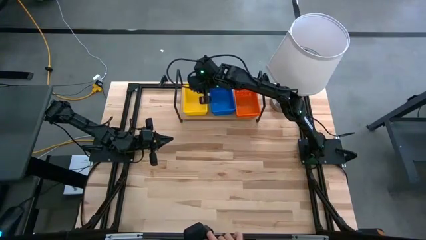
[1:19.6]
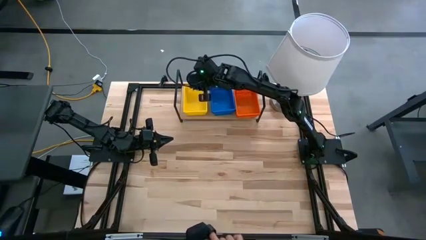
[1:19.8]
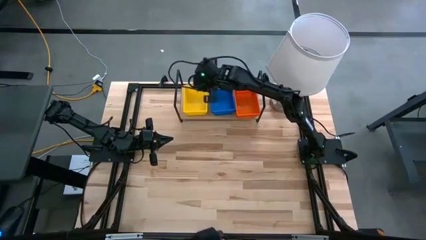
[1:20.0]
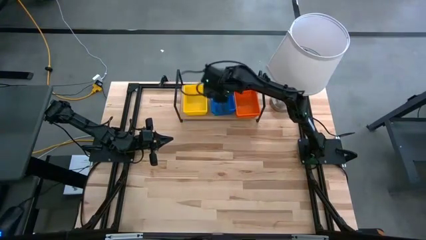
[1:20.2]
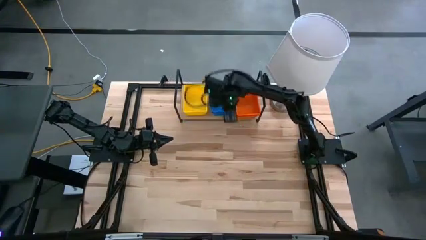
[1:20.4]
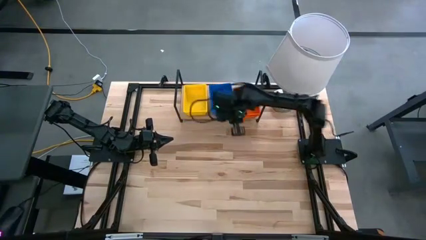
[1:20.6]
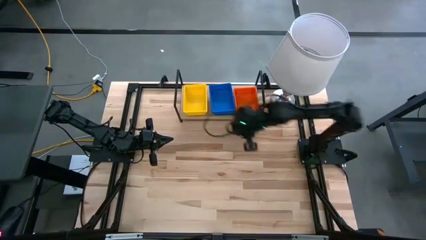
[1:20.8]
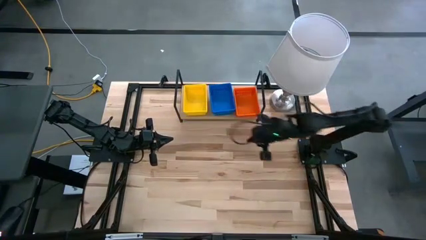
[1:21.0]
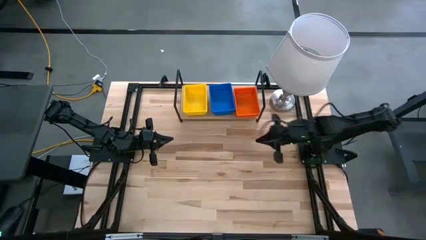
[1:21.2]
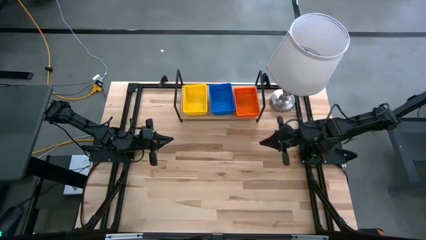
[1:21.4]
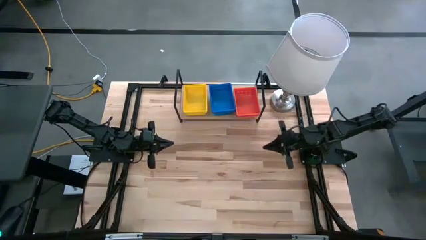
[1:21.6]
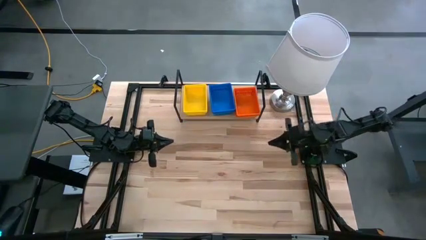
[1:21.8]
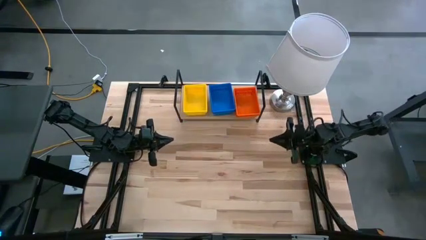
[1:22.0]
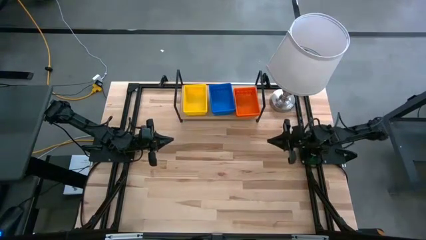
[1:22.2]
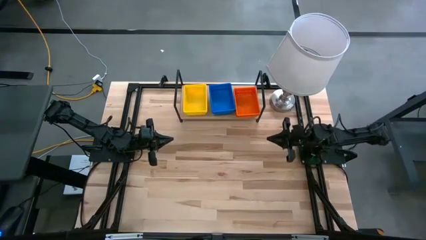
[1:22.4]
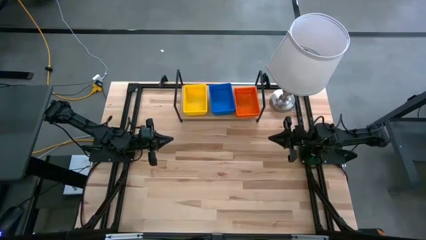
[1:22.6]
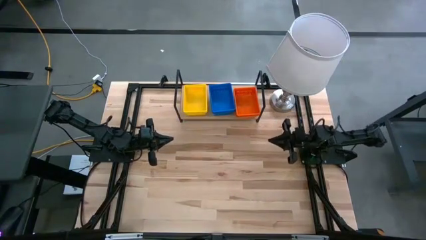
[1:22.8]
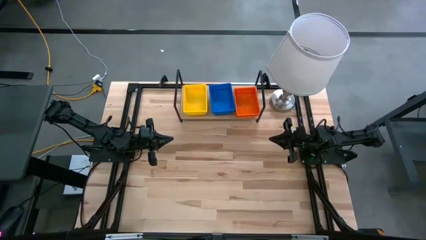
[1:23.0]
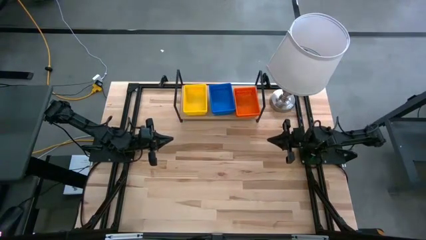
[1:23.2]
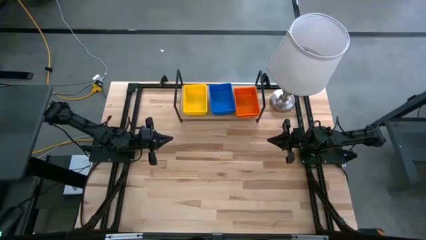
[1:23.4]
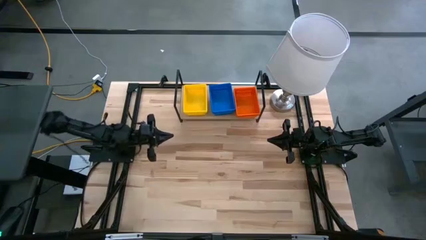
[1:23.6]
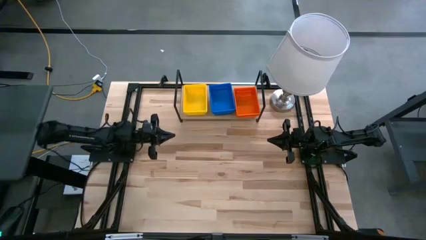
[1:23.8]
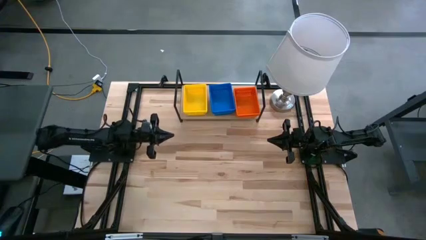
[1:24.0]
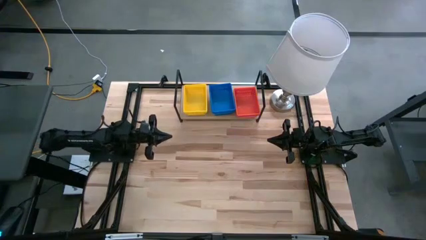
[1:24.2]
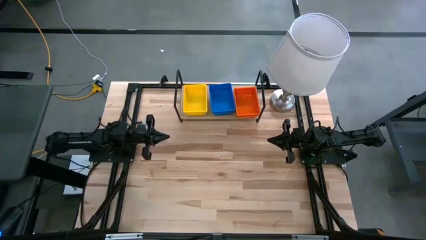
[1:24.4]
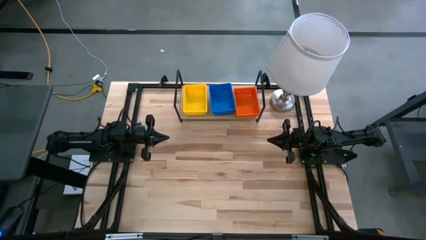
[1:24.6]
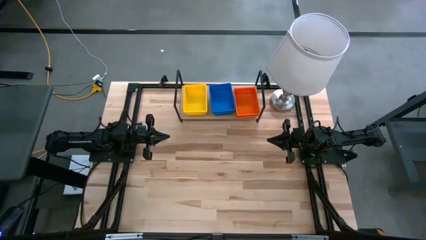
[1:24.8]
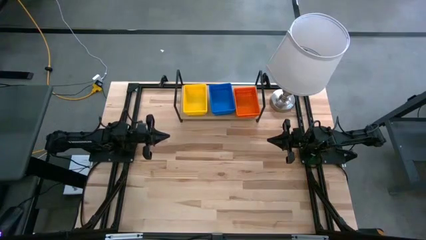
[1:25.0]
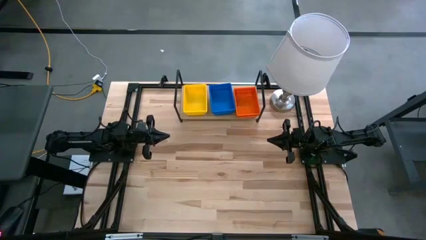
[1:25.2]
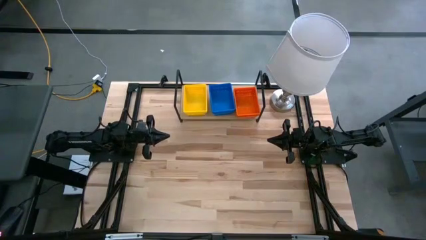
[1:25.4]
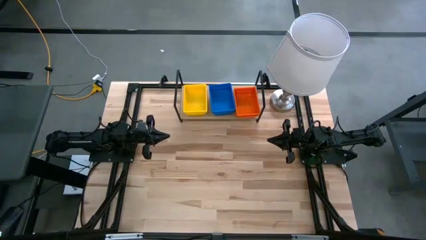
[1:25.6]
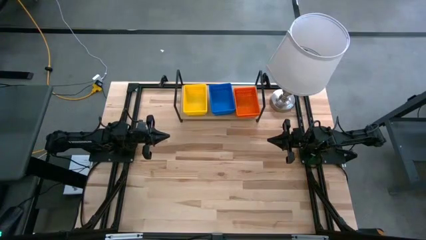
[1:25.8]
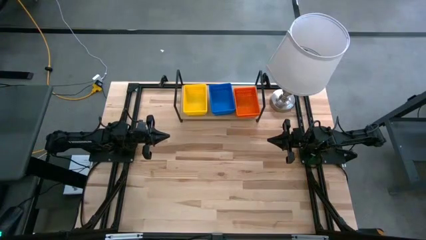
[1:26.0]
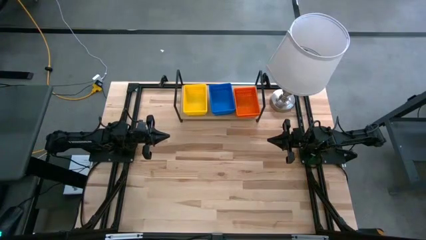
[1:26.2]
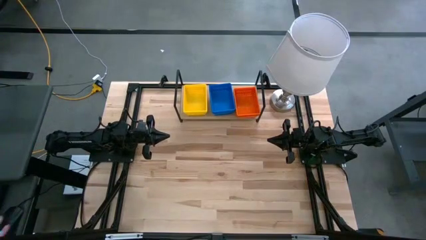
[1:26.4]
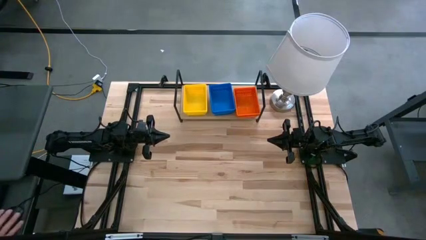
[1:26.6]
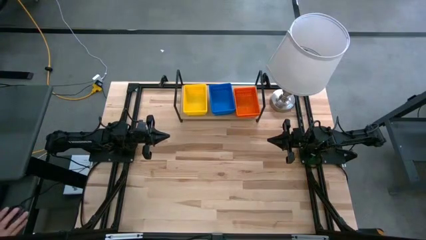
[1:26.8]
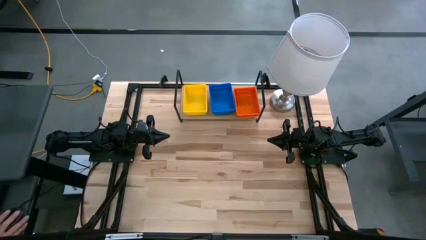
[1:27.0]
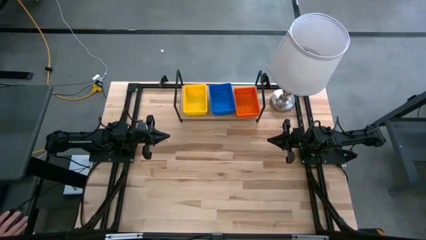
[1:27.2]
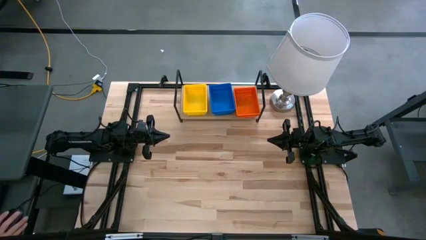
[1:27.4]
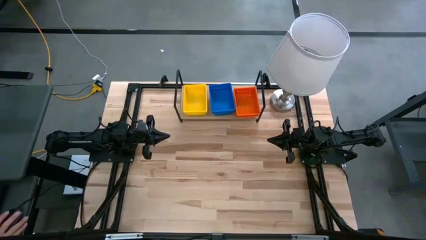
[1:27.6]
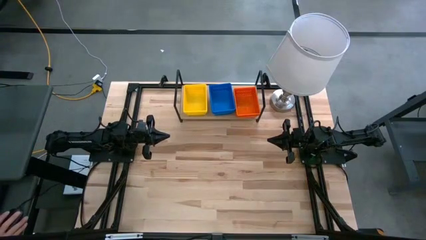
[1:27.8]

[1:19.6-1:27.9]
Task: Stack baskets on shelf by color
Return to Home Position

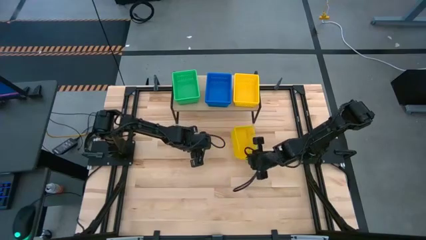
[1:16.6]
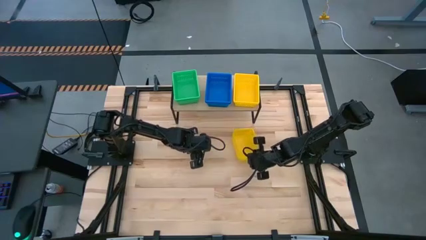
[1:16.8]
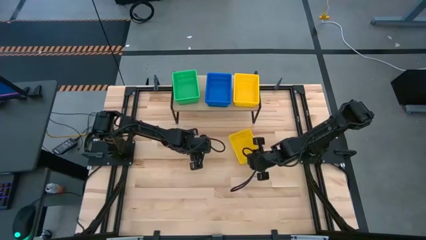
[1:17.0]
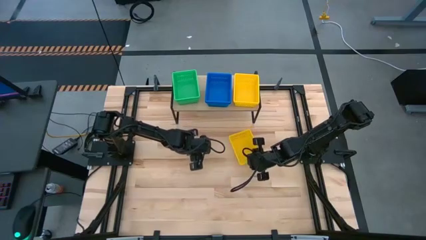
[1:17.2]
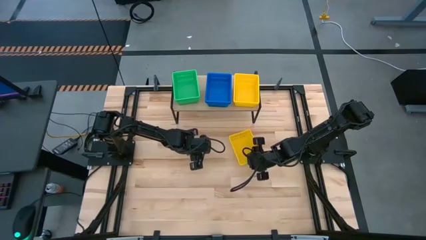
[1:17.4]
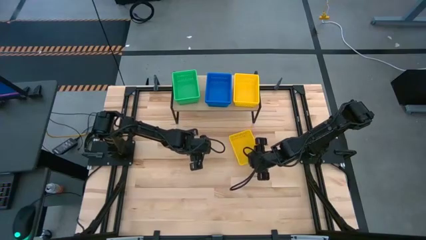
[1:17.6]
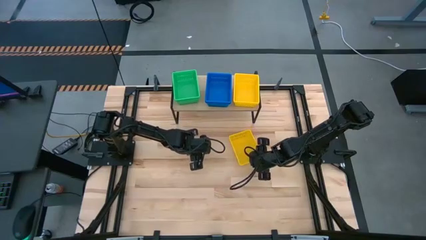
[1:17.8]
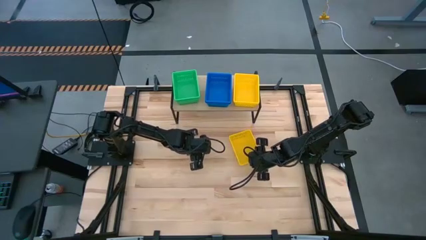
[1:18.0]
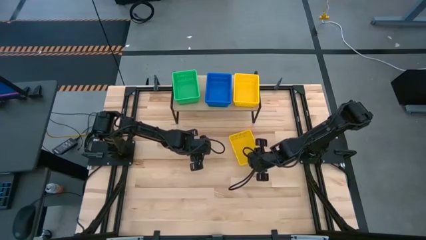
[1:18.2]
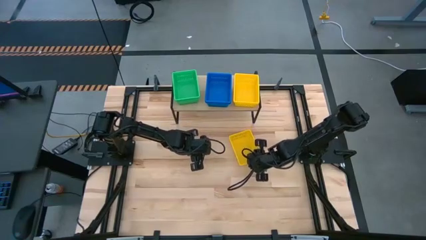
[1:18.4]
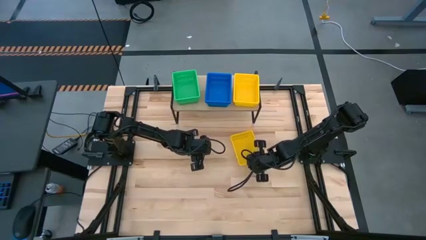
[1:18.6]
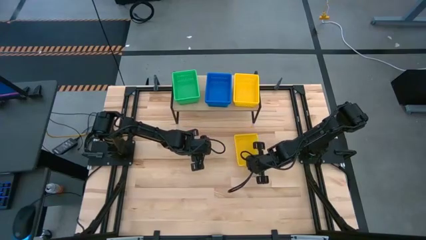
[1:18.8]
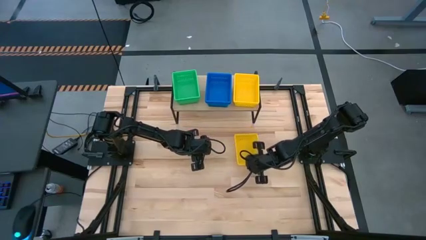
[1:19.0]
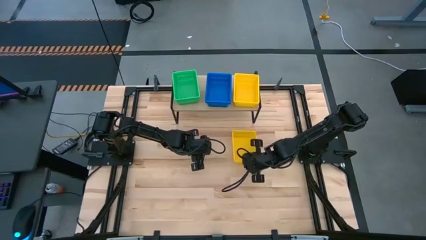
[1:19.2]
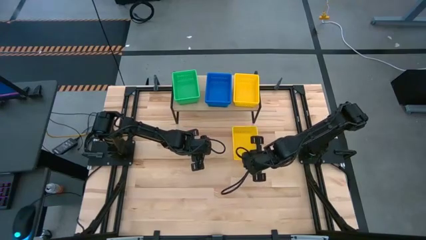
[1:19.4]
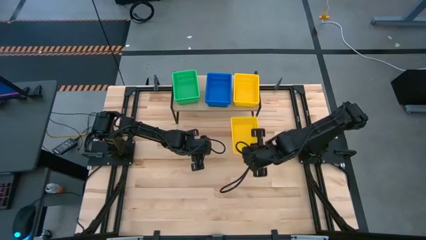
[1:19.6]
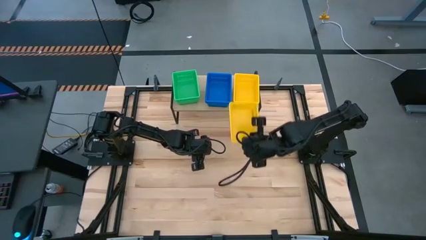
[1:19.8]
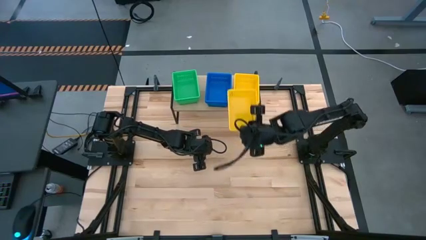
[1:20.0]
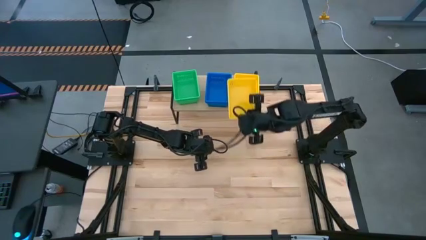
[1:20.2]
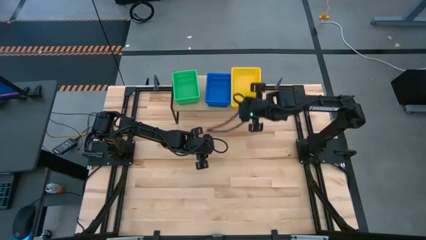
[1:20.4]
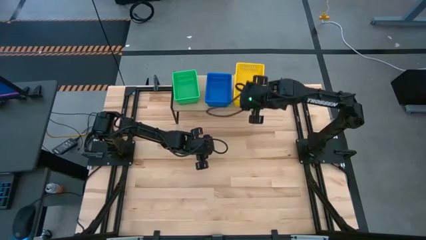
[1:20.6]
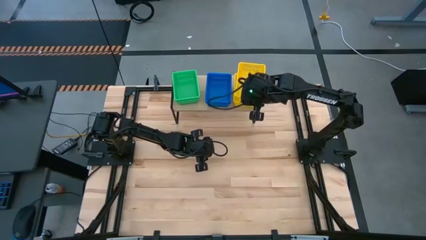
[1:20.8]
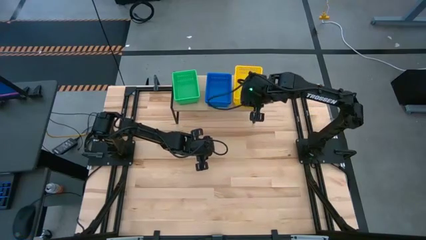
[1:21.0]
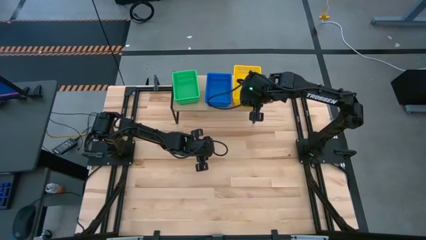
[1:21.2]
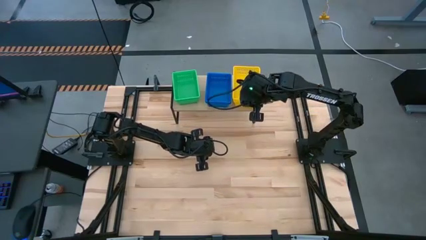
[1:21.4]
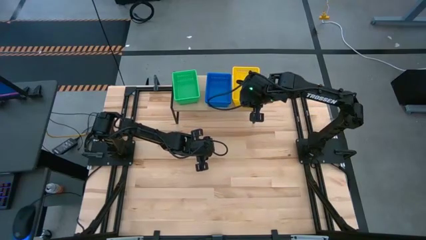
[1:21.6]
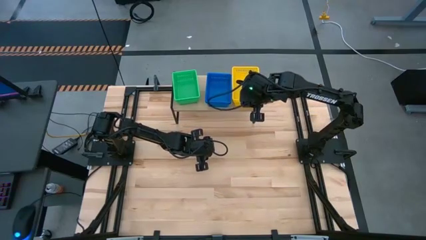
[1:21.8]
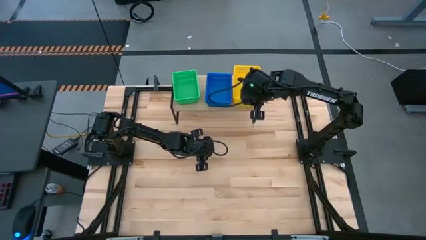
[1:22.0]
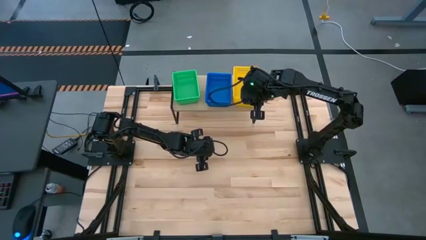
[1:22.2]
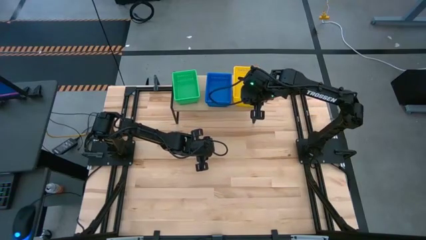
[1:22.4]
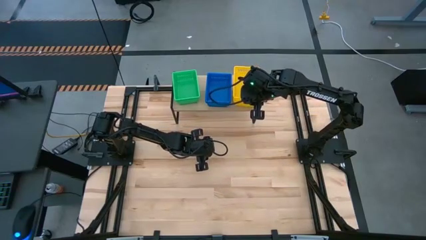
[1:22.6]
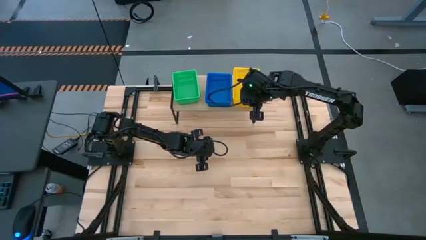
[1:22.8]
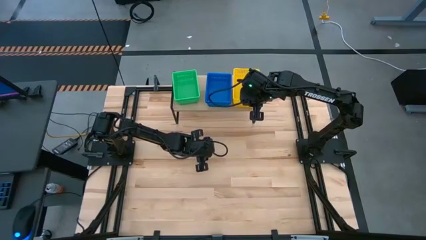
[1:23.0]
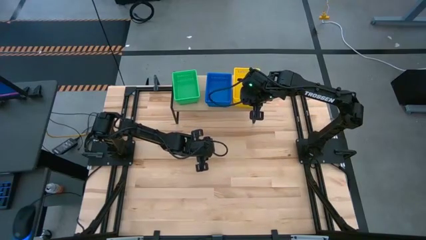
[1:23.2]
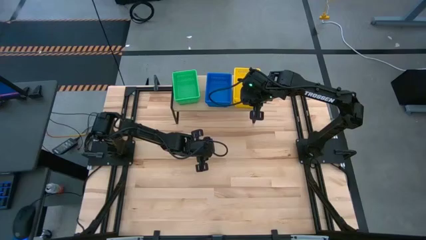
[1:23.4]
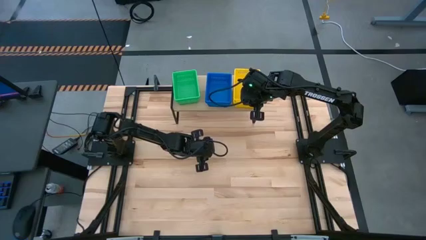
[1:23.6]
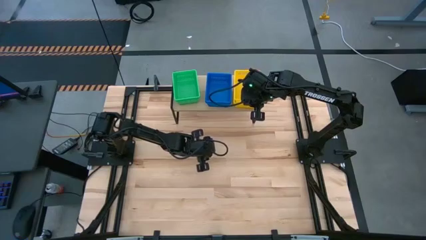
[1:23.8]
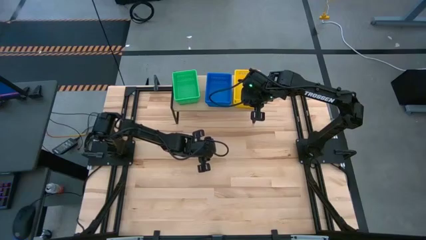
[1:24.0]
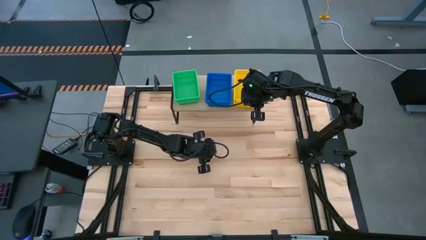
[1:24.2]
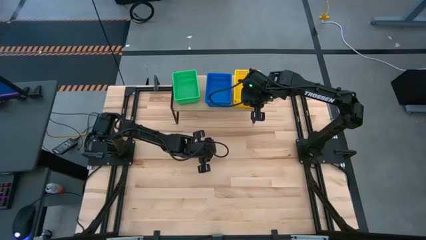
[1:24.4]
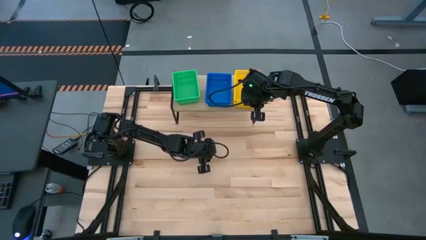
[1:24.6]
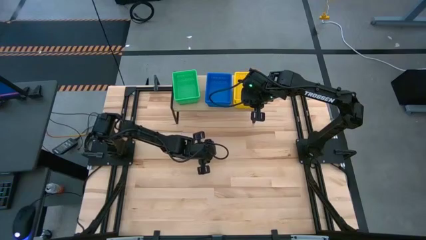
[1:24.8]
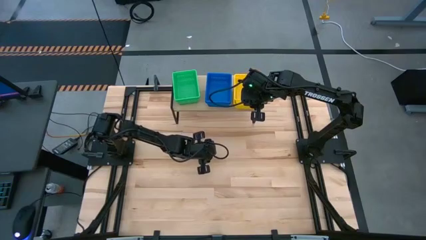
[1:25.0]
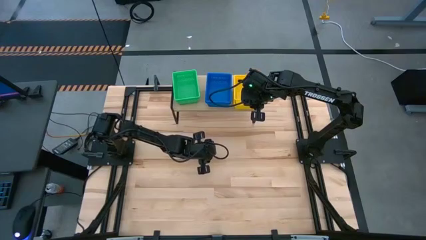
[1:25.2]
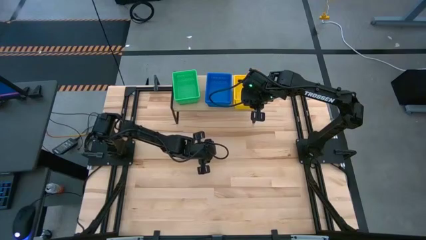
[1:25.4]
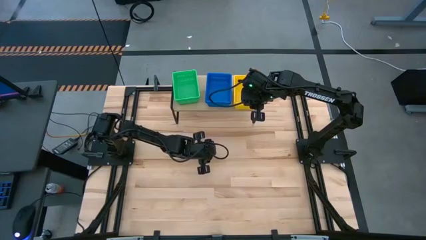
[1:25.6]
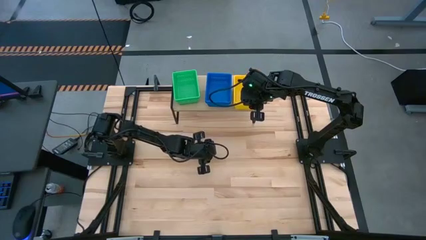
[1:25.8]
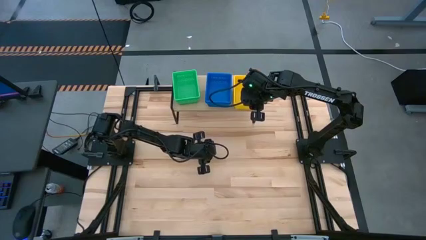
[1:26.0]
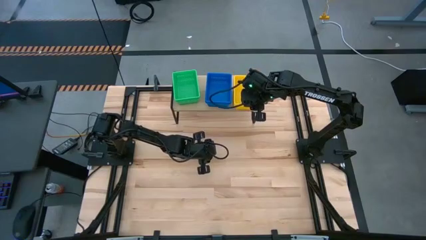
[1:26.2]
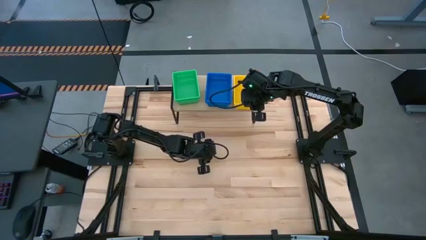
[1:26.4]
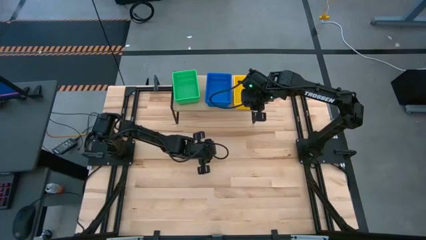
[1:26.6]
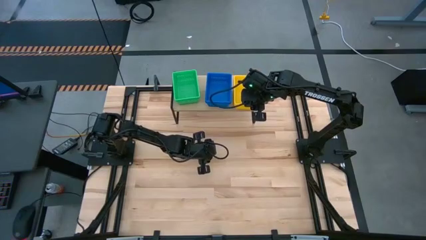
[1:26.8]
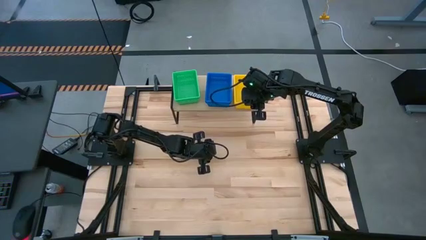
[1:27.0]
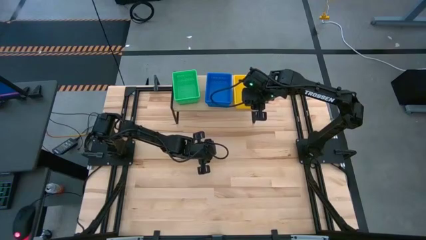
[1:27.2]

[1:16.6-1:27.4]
Task: Stack baskets on shelf by color
Stack the yellow bin on top of the yellow bin on the shelf
